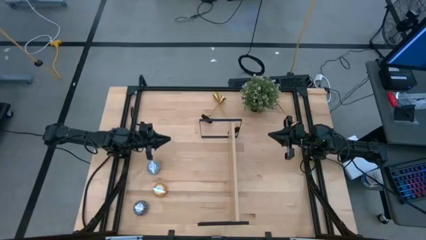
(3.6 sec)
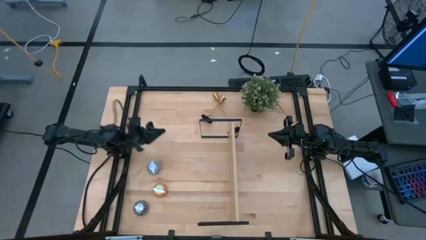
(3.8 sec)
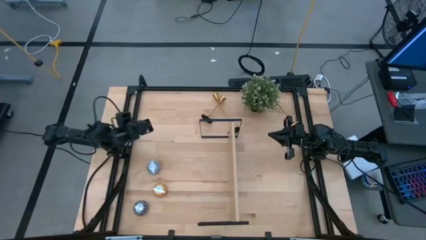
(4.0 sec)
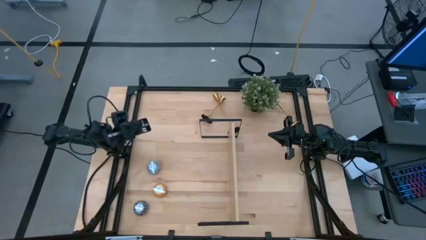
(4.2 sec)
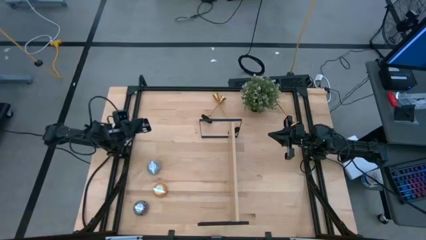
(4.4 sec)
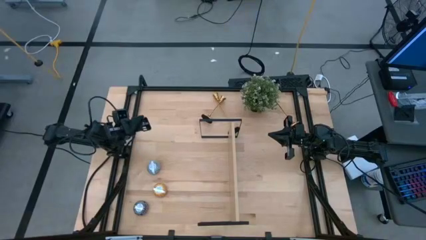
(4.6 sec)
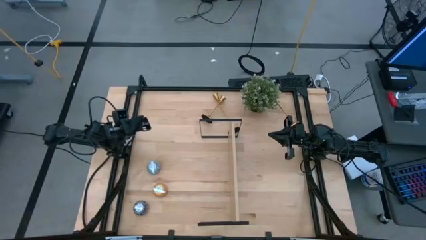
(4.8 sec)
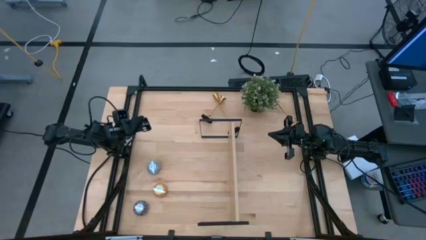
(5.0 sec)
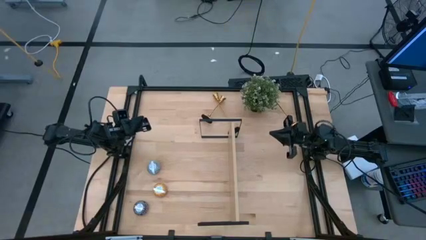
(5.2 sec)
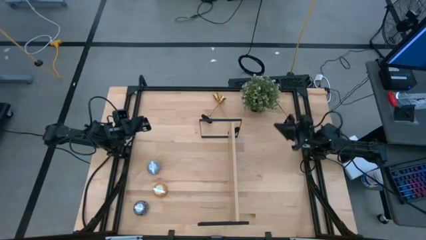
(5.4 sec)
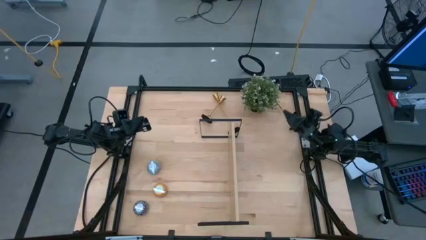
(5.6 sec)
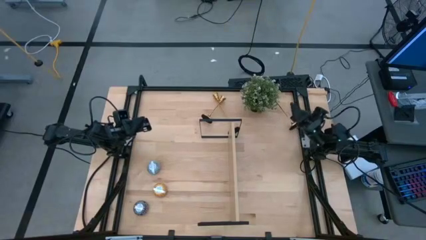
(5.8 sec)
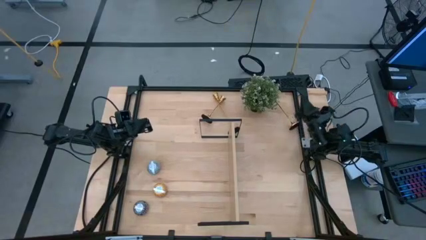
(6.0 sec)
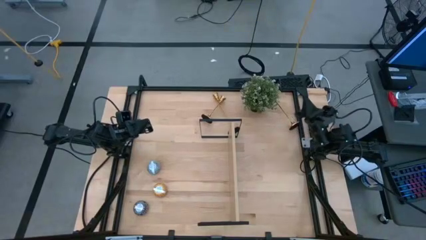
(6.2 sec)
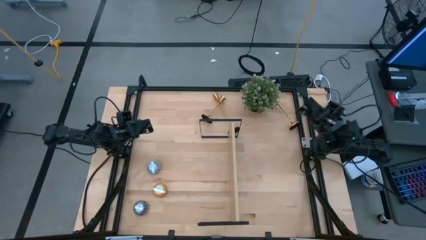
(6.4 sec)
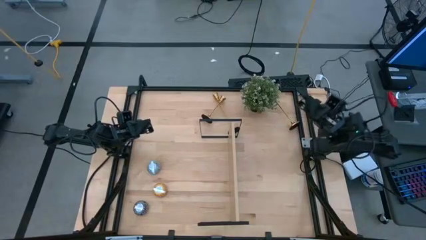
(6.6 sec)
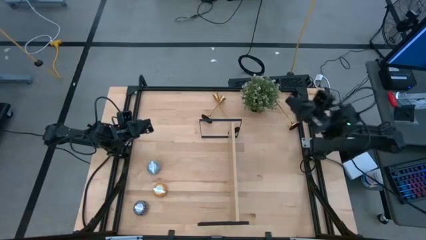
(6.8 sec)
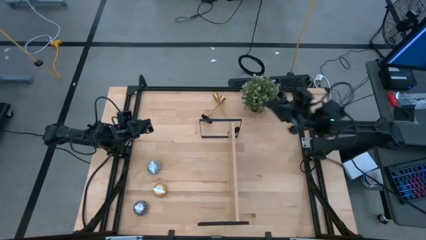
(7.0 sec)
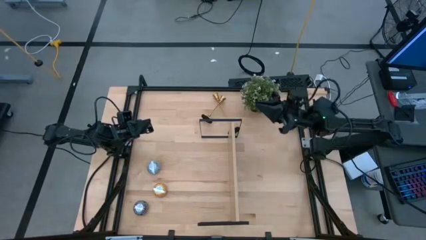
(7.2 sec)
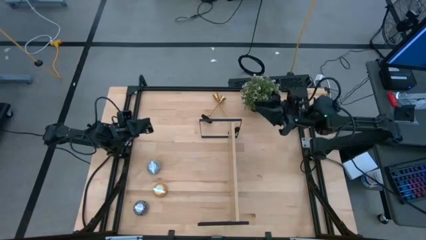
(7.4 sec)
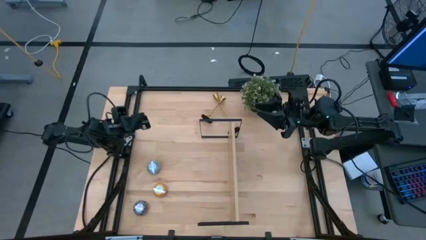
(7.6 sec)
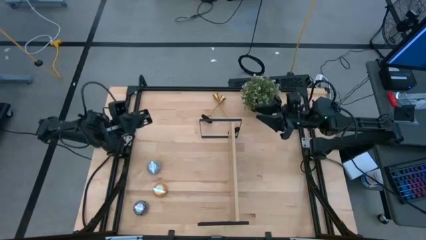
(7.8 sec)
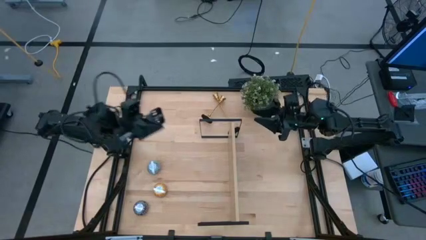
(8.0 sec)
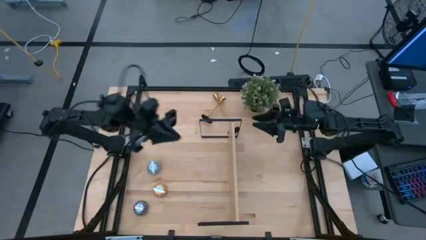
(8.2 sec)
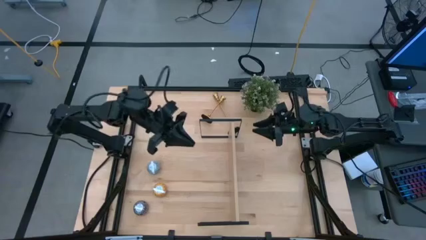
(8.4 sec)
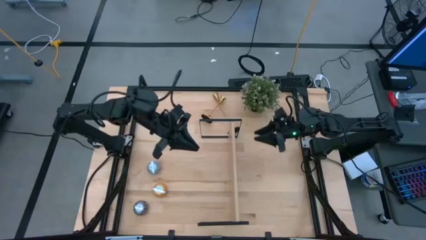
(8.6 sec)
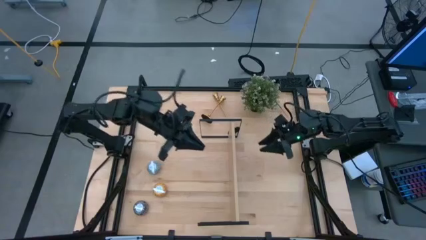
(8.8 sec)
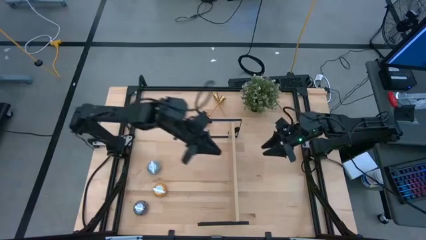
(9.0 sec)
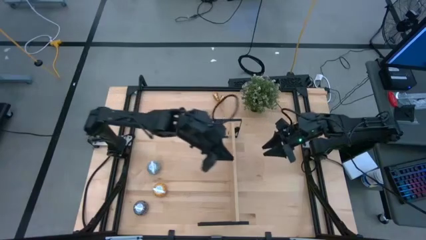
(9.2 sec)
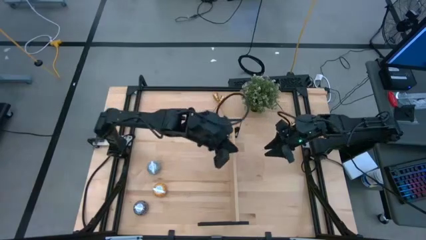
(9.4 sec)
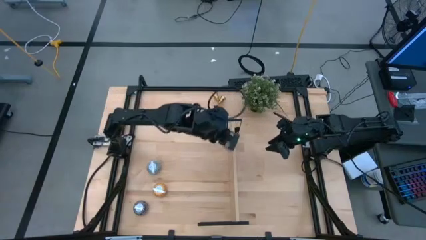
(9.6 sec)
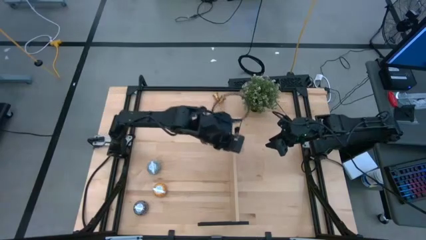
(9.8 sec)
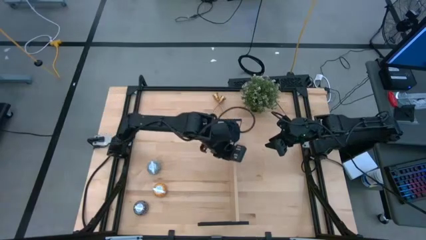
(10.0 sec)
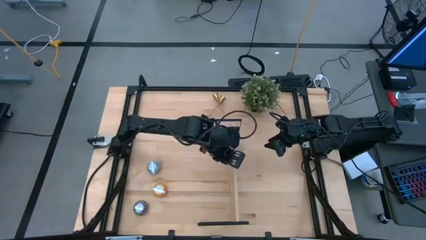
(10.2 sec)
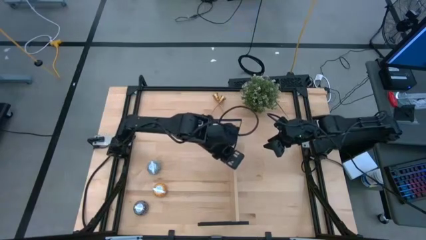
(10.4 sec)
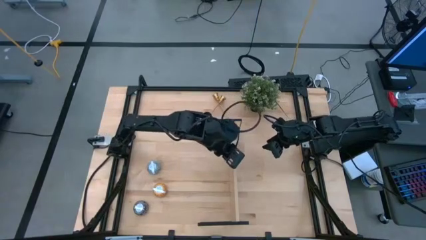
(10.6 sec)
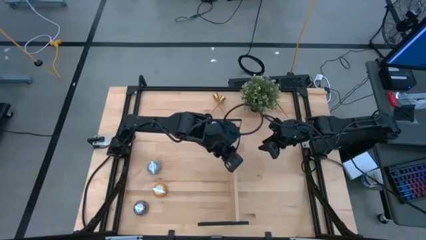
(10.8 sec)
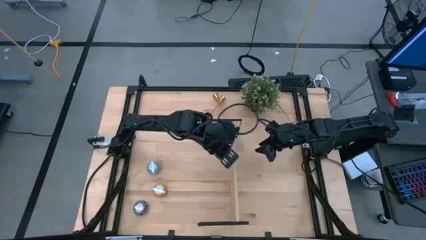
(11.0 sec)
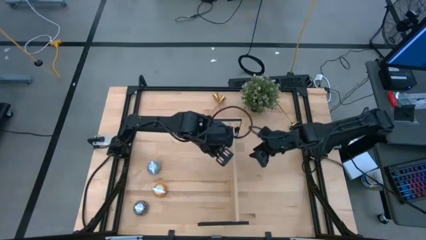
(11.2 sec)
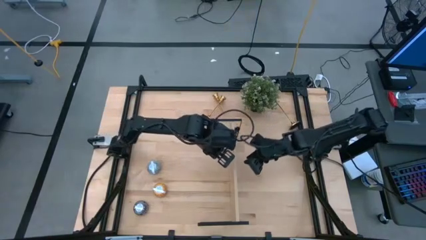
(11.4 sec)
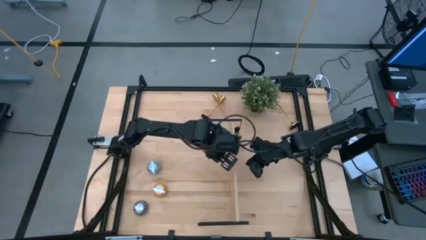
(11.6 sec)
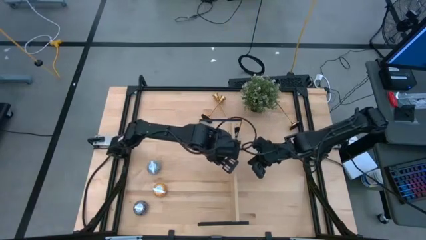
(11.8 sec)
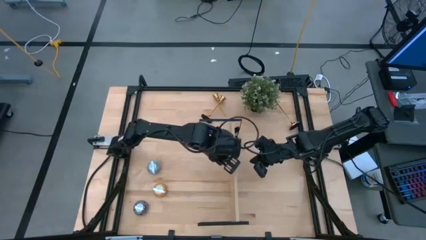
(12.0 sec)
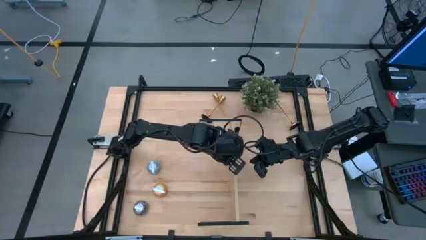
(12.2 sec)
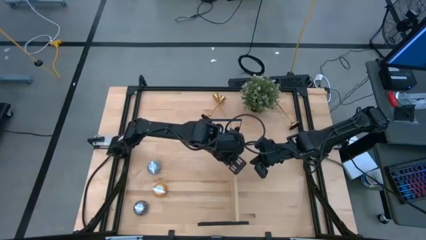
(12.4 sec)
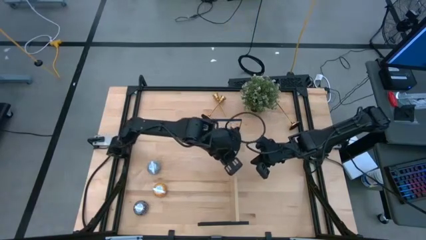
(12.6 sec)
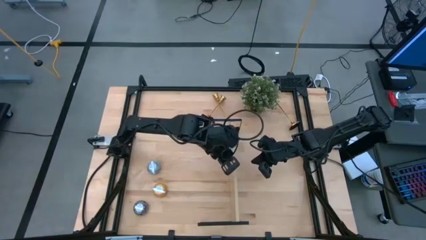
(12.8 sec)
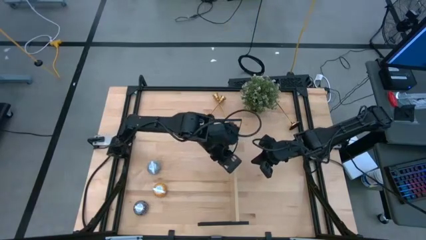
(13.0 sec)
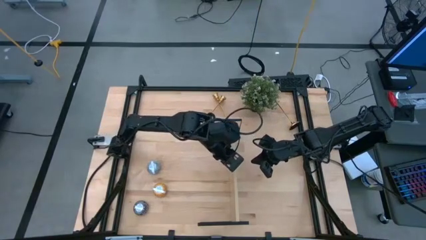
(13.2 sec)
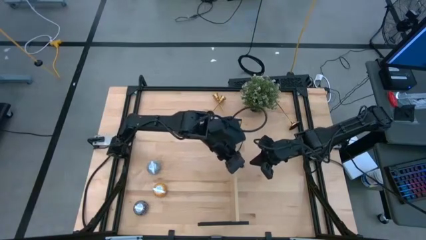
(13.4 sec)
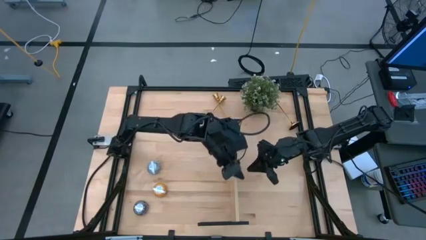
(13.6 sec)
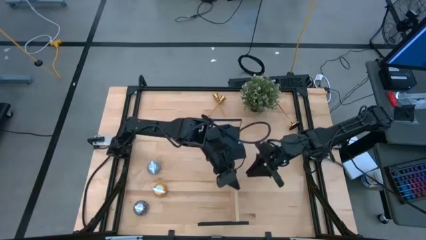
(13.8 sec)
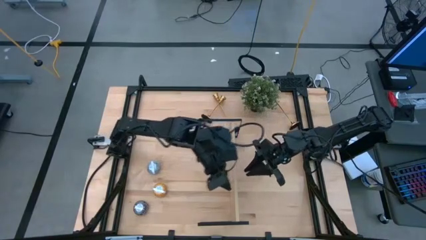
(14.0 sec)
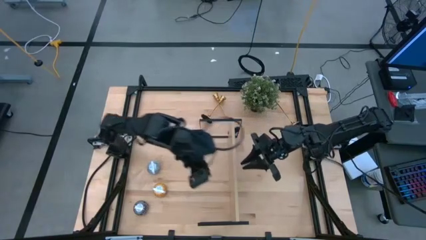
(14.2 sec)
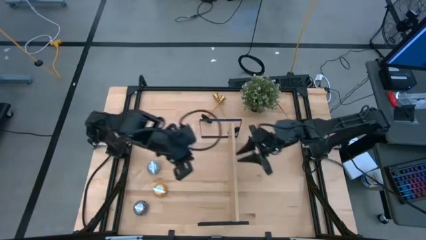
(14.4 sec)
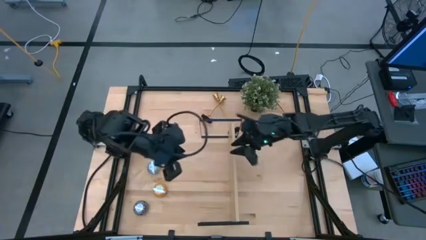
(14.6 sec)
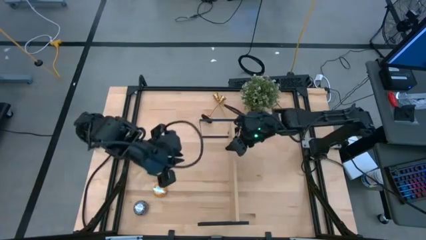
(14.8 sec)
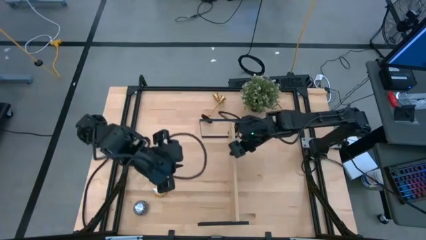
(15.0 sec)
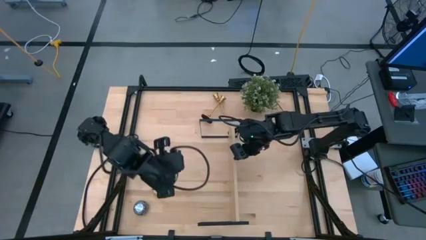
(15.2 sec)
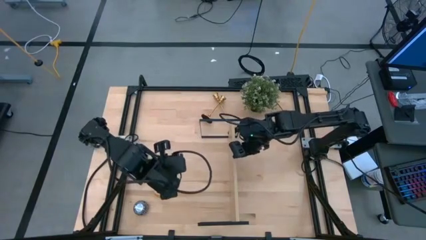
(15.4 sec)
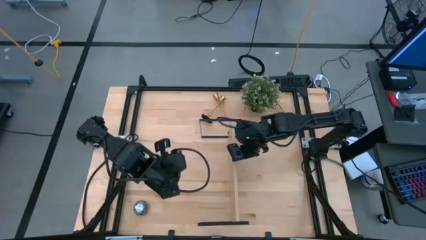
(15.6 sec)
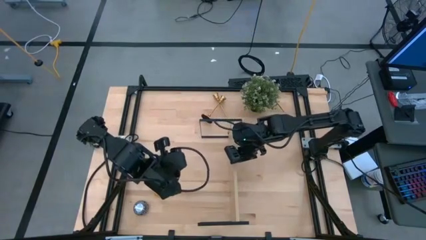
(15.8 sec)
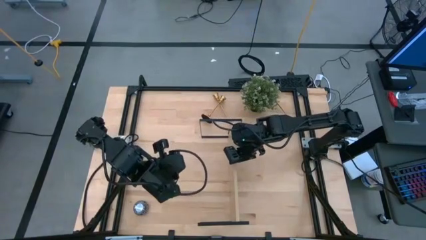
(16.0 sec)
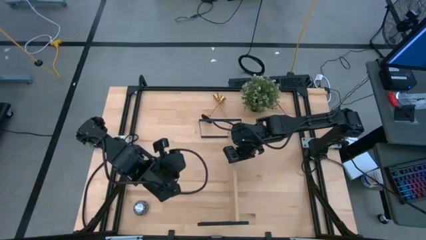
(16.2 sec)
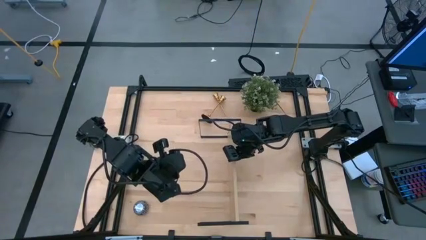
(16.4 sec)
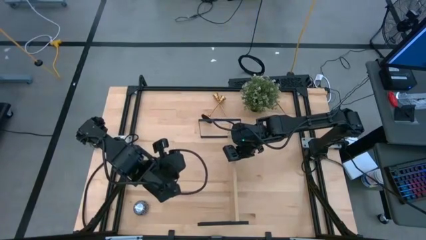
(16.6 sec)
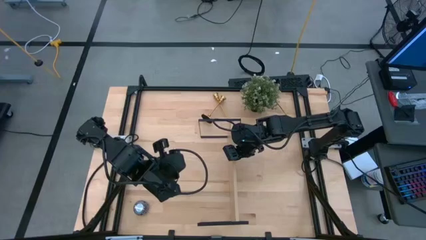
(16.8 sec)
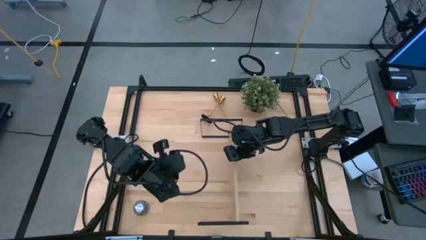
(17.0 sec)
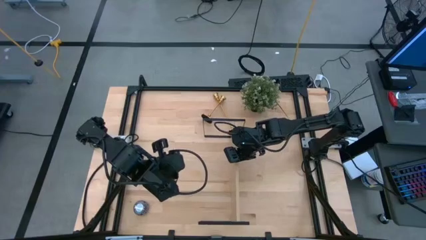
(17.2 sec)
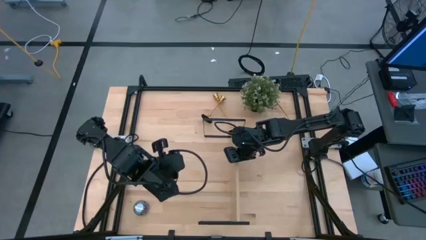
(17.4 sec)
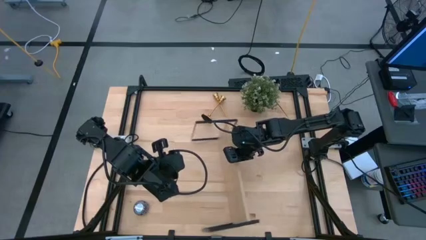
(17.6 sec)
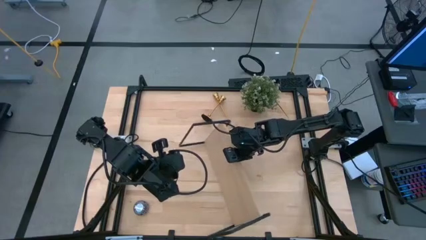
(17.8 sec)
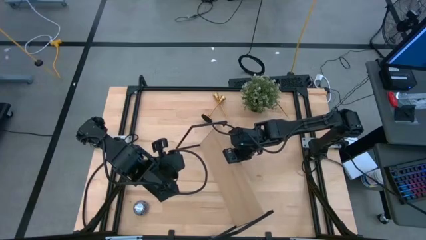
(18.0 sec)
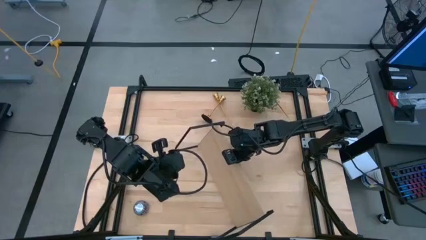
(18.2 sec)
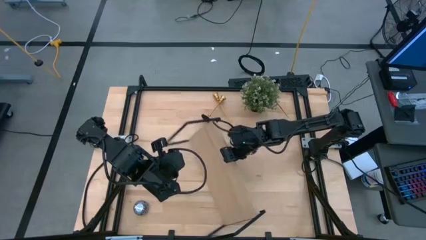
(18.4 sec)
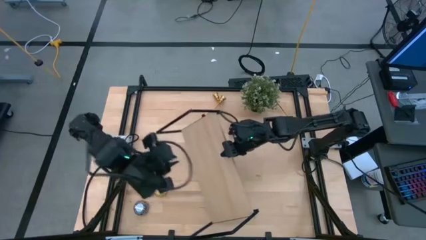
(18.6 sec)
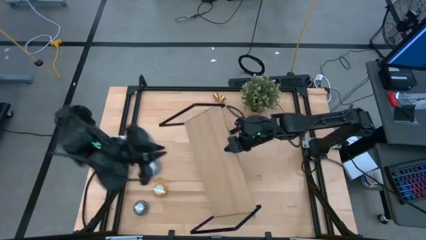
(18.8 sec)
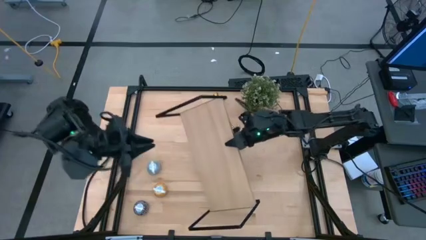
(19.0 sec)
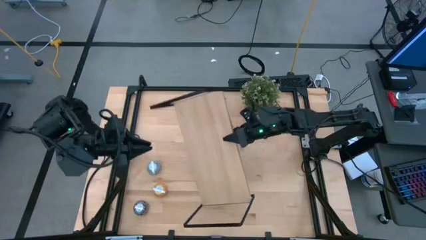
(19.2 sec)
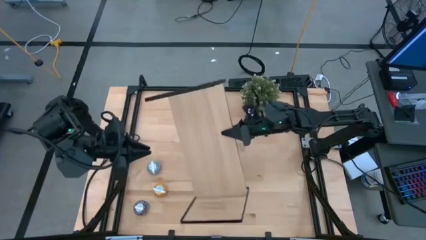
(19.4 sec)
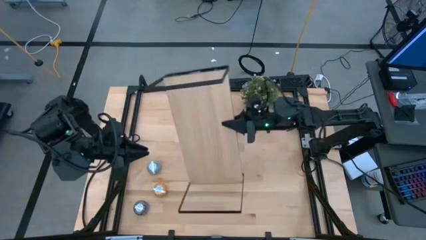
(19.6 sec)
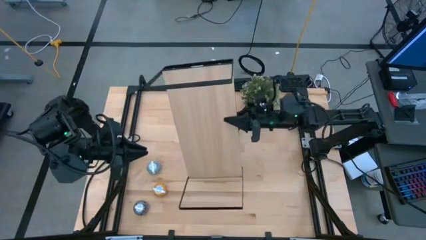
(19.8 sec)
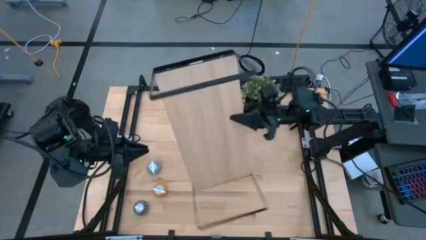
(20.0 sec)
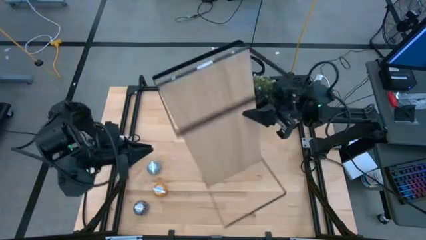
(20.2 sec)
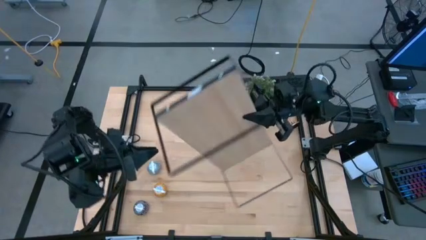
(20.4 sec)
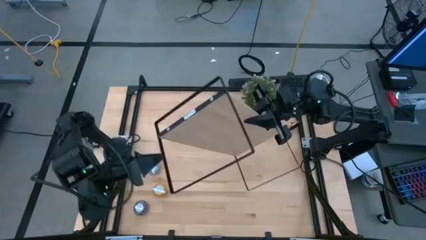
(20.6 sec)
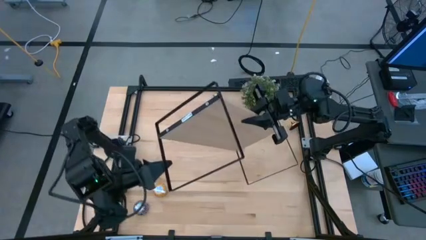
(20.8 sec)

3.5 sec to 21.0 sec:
Task: Pick & Place candle stick holders
Prepare the shelf
